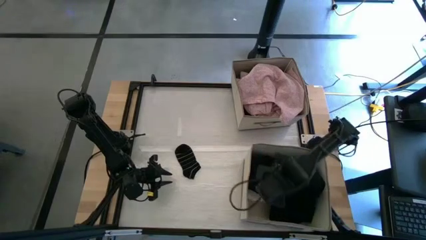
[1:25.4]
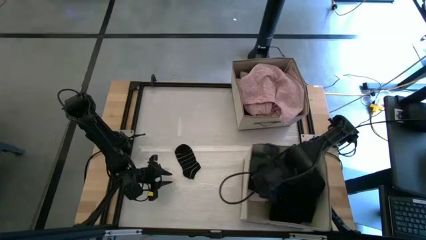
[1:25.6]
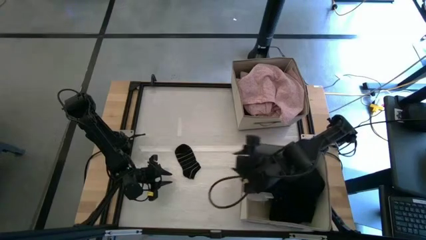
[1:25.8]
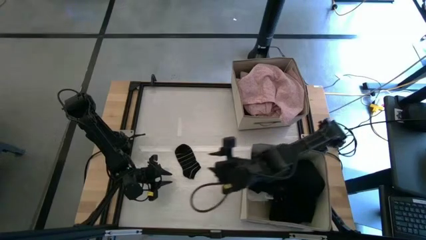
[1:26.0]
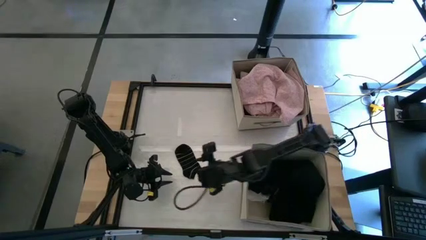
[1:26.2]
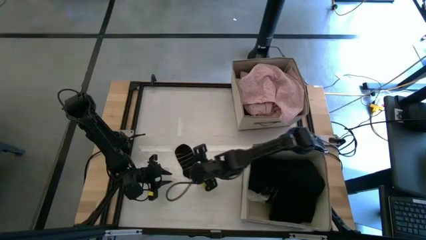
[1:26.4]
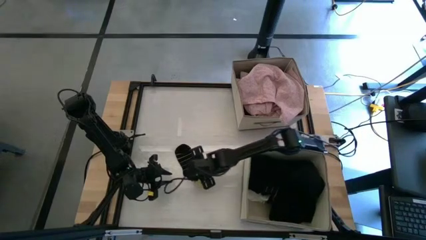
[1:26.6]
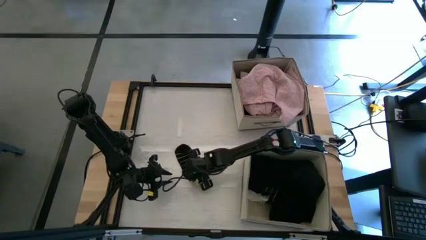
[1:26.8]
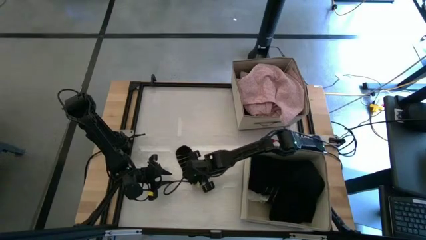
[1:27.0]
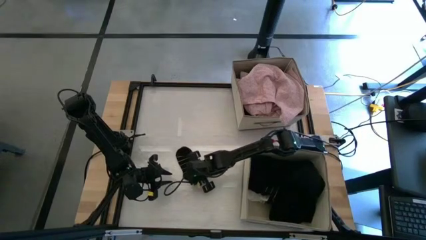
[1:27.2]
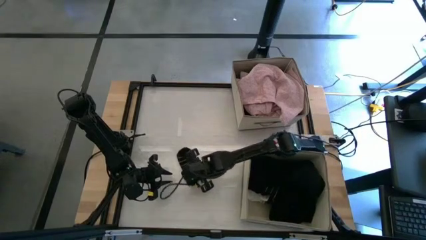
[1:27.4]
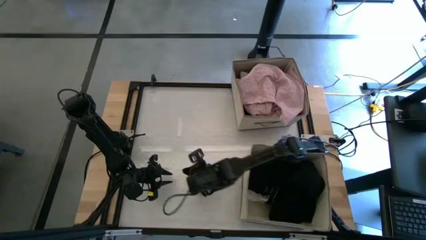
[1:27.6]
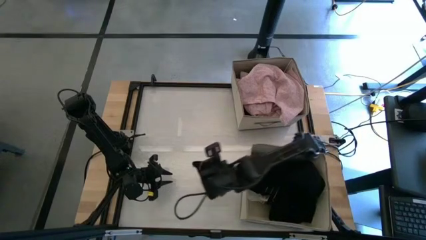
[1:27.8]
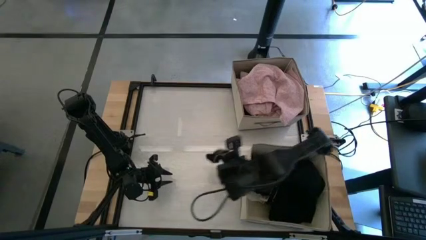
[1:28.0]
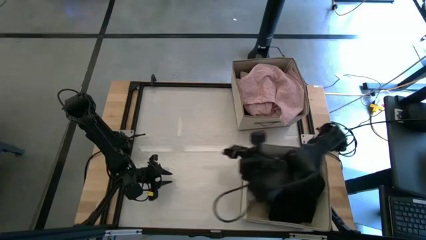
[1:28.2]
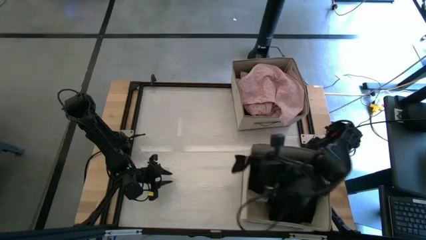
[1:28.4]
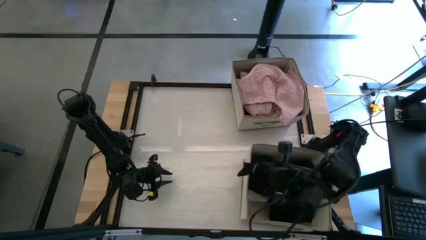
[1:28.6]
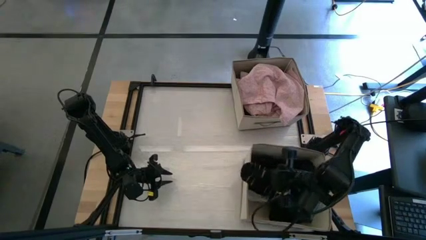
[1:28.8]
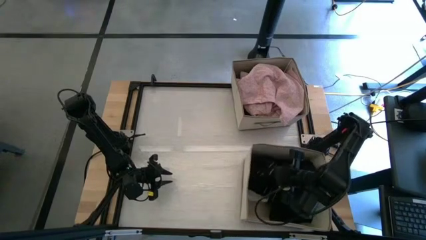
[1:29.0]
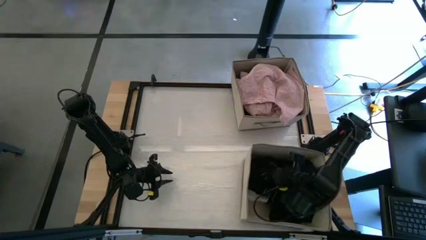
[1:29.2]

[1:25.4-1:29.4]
Task: Sort clothes
Put the black striped sock into the bottom laundry organizer

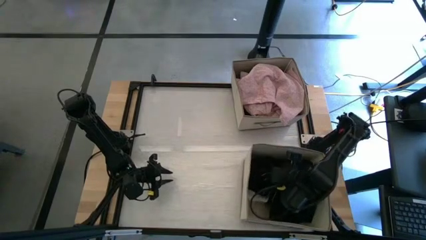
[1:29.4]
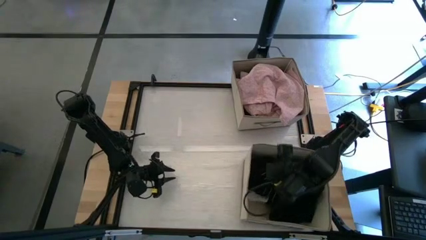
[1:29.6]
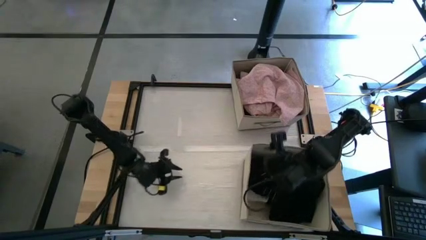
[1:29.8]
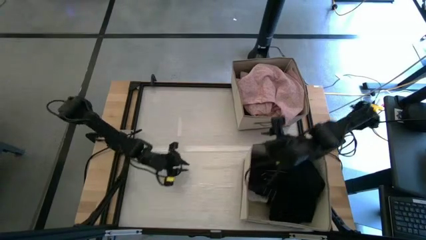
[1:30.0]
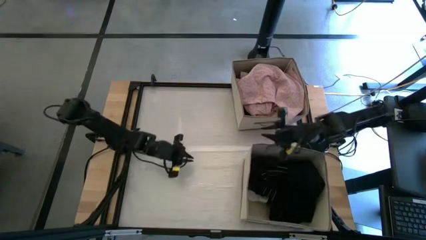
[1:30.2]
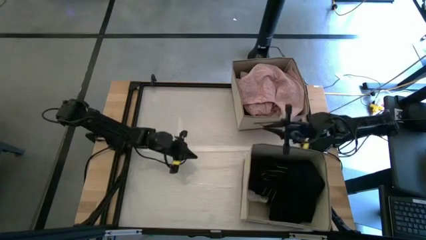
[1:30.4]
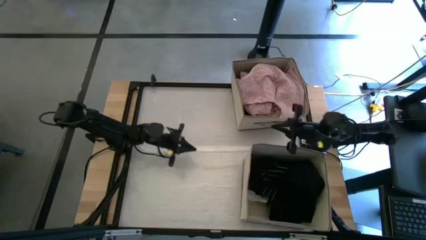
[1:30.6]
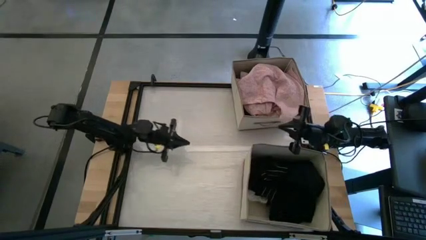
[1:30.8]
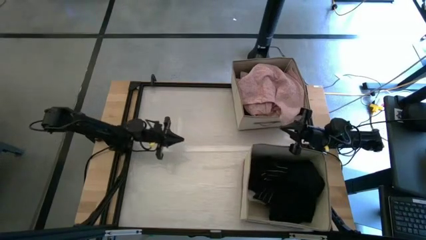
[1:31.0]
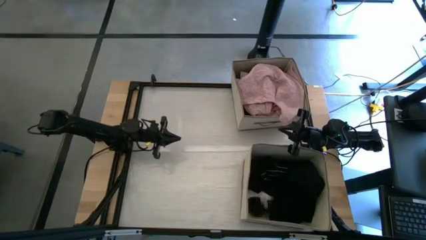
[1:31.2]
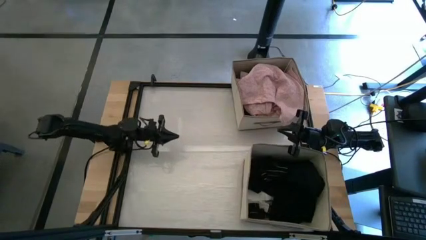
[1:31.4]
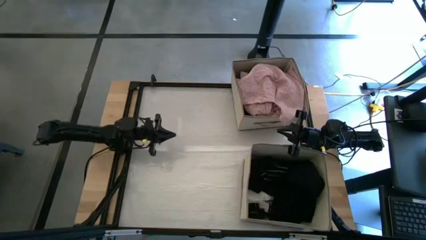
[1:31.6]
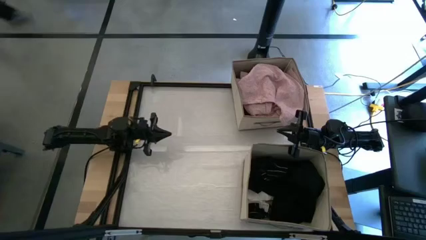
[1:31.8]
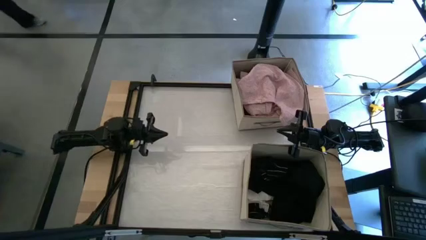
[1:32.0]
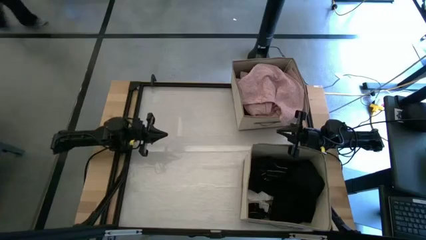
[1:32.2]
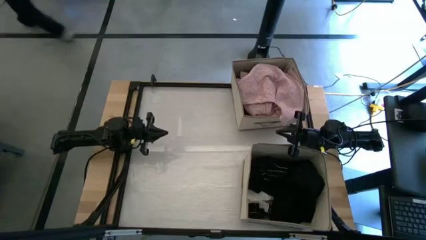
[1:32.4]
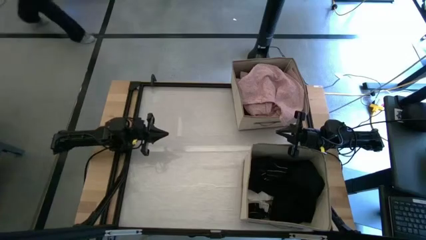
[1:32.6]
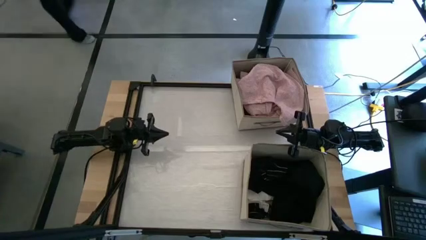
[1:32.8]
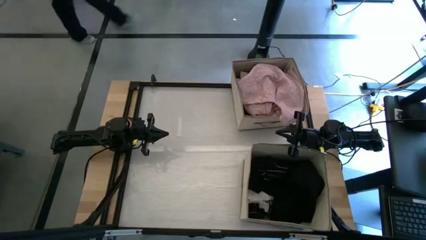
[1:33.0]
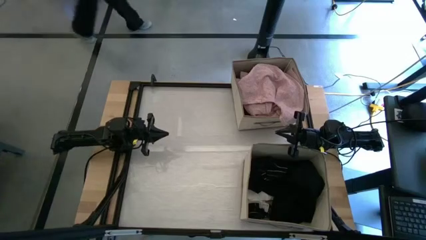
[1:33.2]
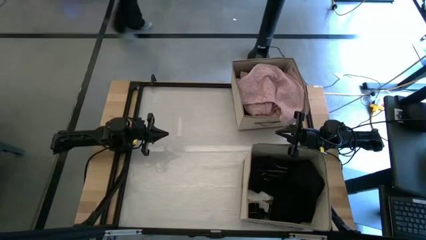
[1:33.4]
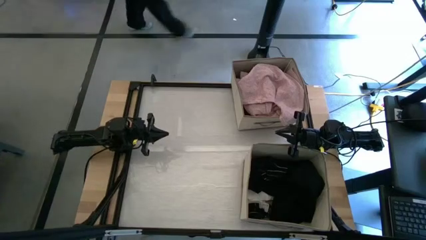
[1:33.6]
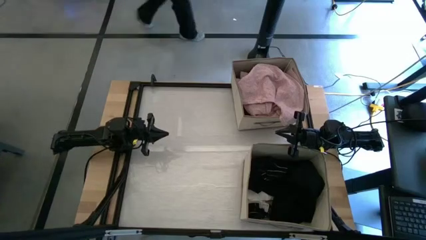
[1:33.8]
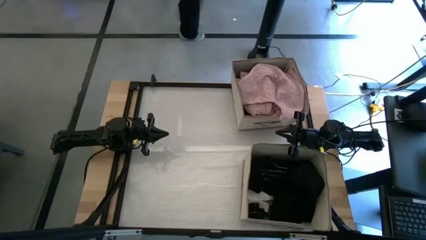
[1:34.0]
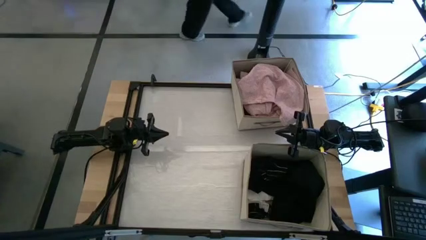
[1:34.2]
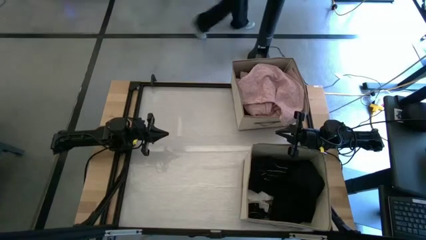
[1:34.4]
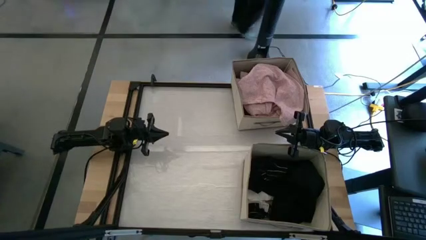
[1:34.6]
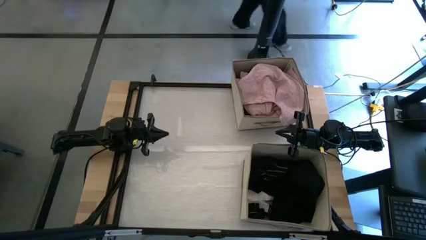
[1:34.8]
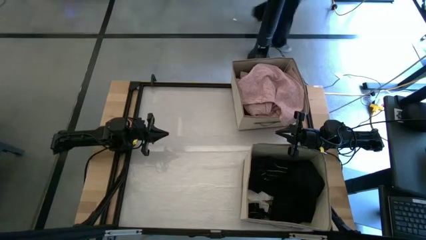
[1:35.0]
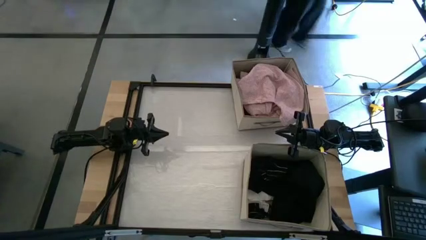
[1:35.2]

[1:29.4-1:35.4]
Return to Home Position

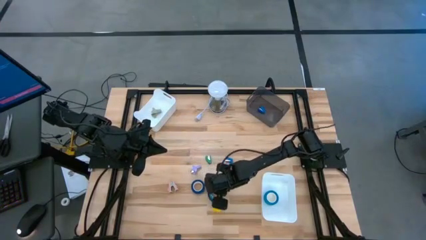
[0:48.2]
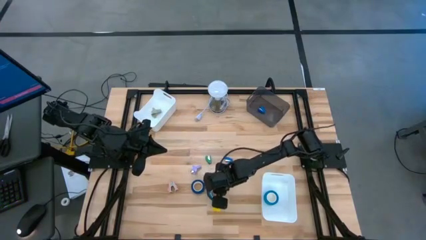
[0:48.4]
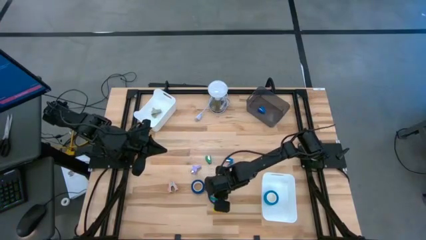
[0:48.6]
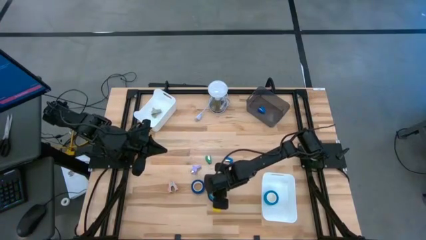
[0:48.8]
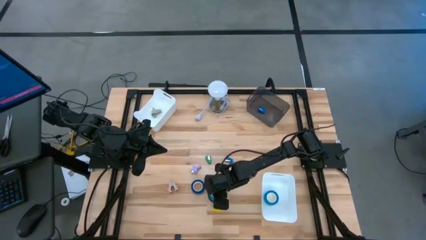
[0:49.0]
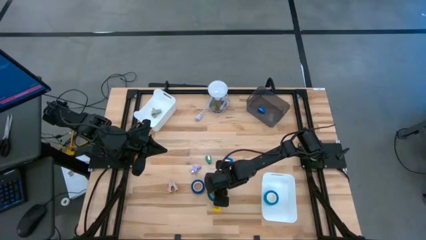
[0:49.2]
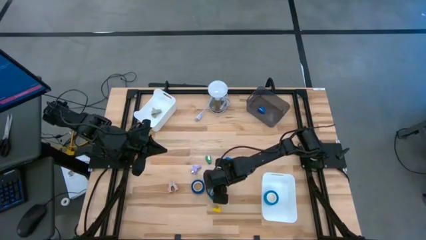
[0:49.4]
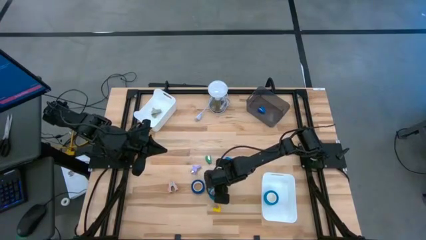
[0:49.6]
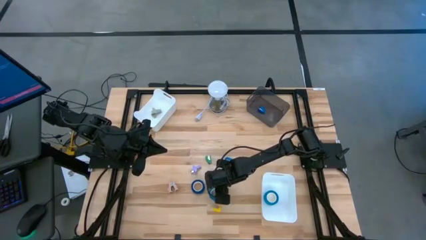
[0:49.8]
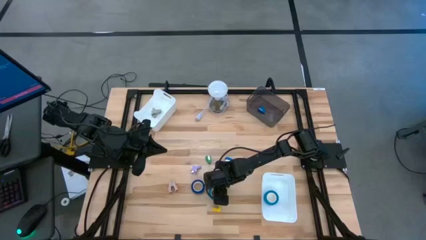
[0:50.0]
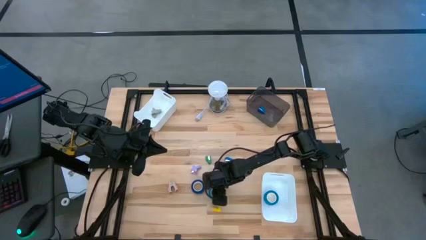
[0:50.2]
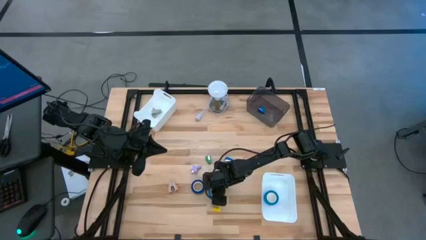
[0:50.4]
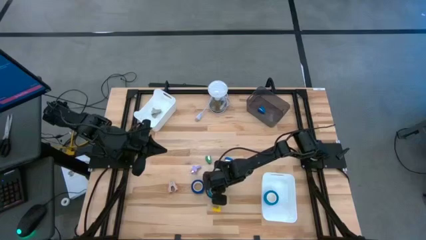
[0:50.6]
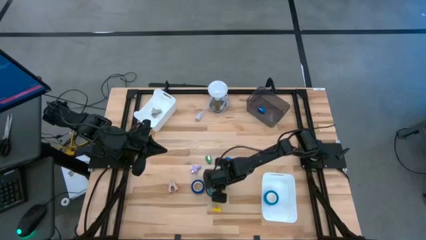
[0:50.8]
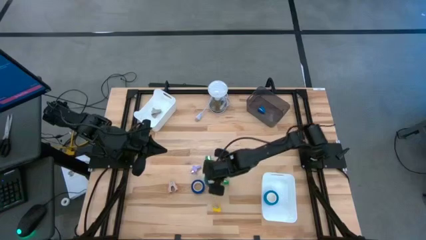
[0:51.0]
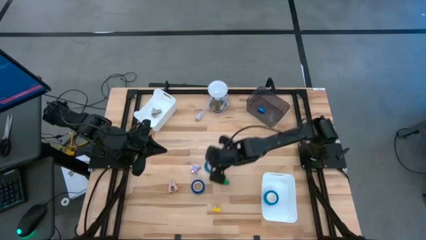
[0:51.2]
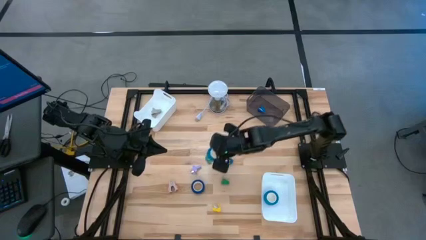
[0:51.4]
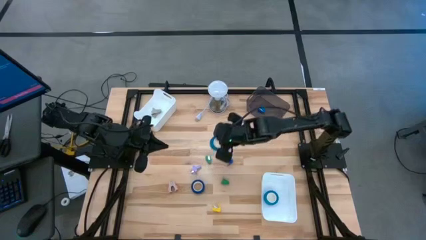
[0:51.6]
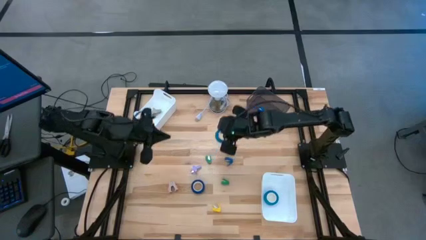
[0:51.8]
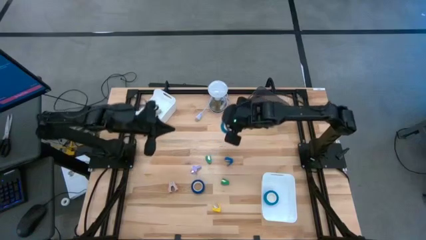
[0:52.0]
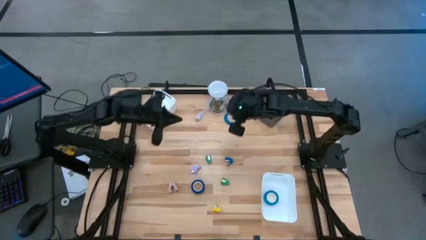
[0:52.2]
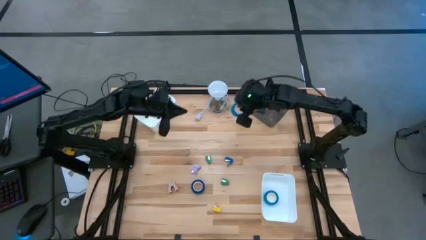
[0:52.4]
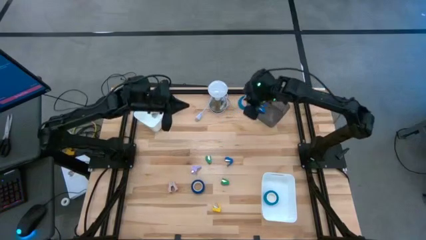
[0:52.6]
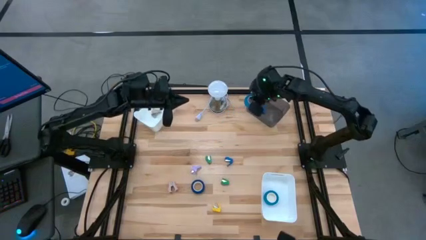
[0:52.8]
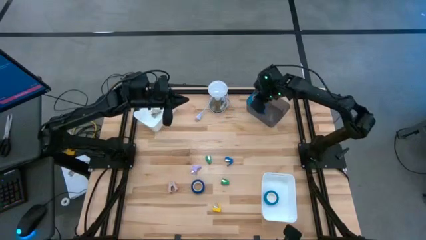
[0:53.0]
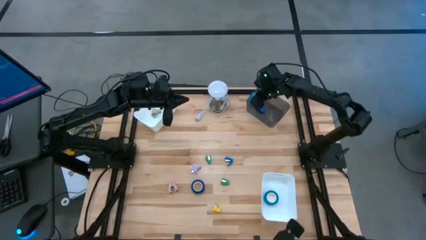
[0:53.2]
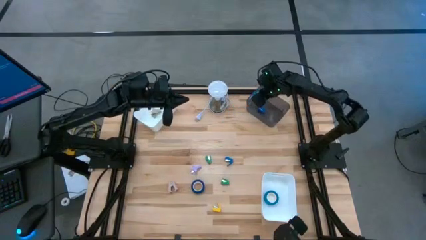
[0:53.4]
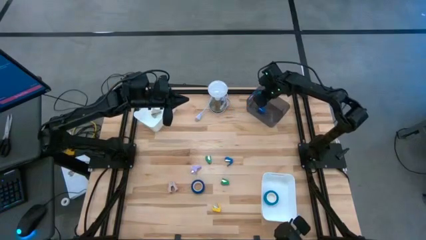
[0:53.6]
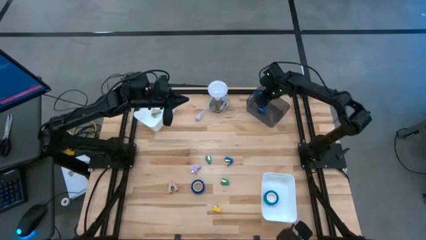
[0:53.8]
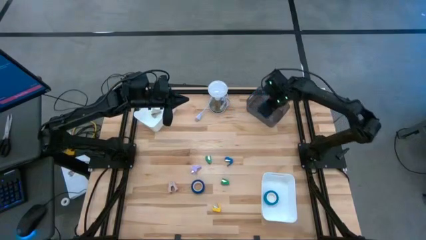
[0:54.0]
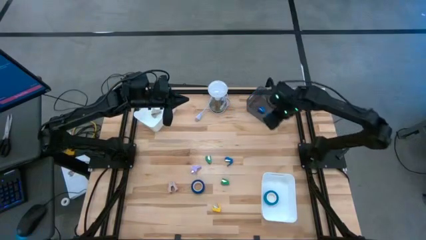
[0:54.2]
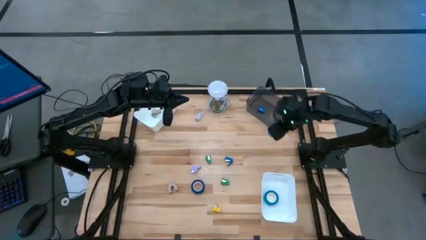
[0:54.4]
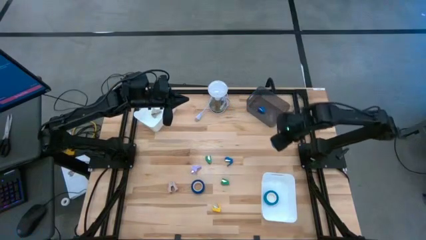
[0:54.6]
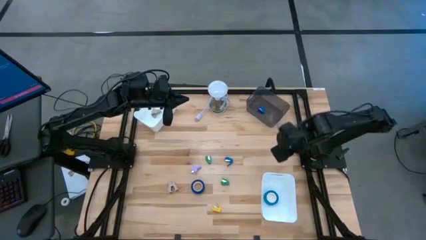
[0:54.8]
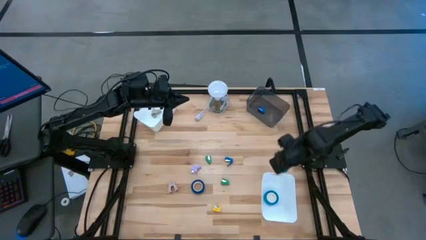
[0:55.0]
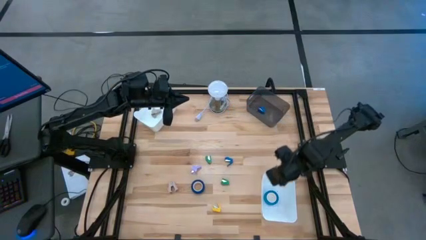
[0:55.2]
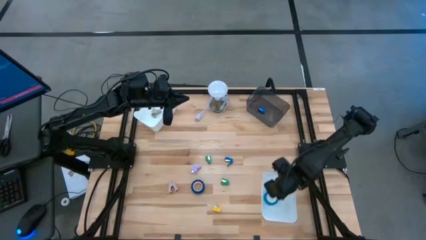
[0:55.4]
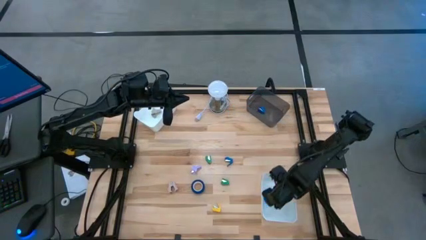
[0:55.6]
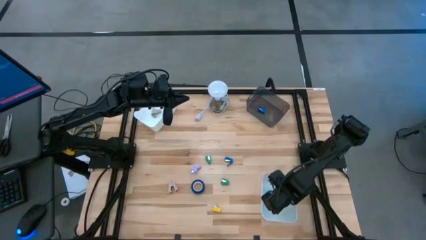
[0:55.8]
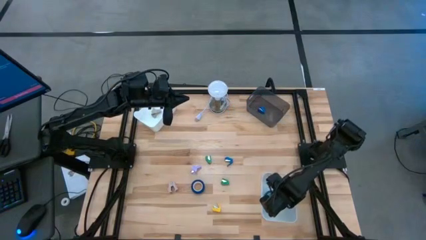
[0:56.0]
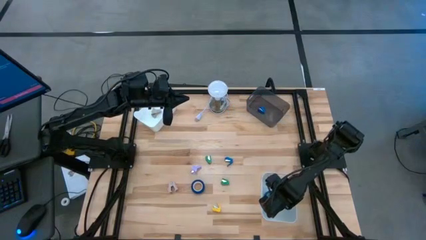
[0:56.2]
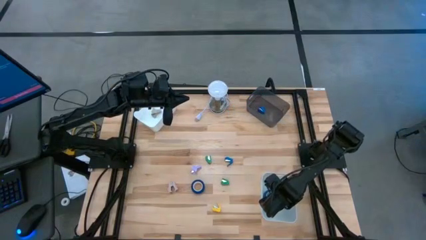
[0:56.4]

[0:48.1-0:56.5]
Task: Pick and place Stapler, Stapler remover, tape
Put the light blue tape into the bottom white bin
